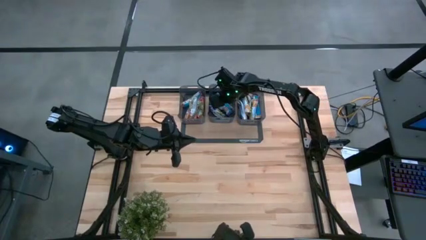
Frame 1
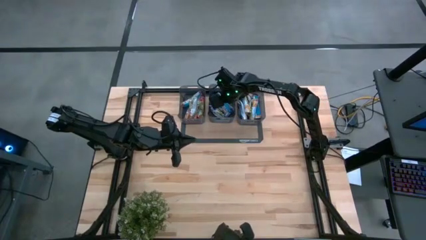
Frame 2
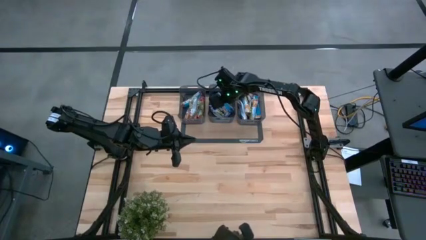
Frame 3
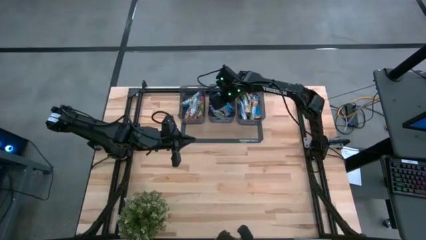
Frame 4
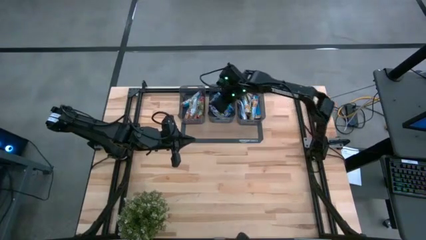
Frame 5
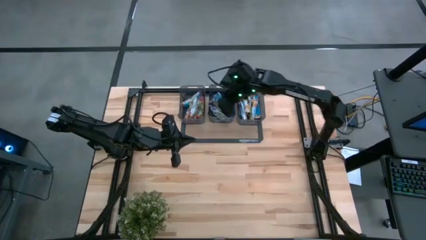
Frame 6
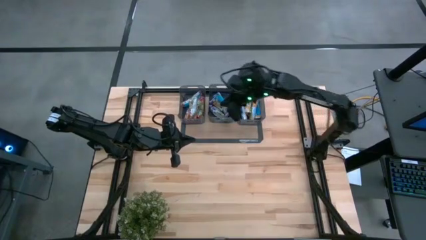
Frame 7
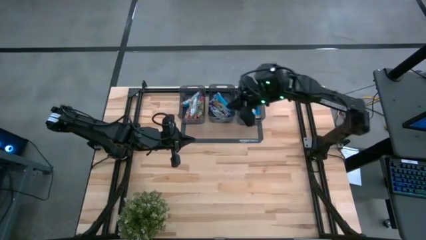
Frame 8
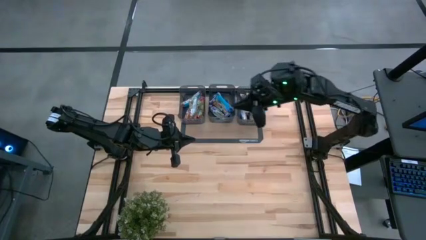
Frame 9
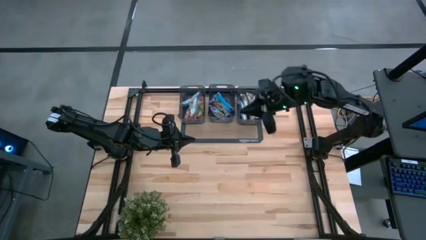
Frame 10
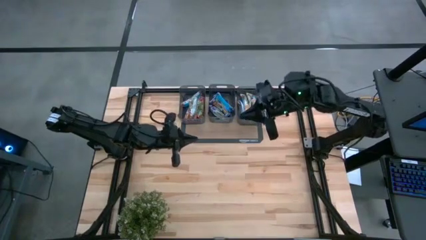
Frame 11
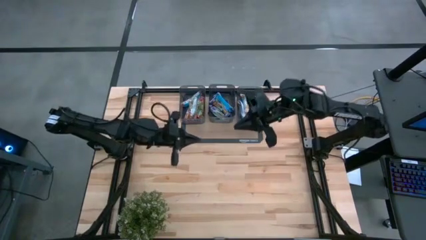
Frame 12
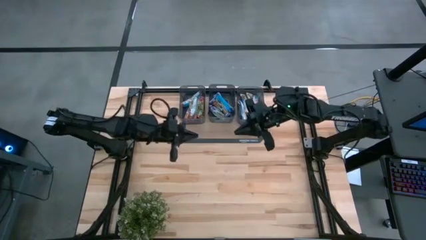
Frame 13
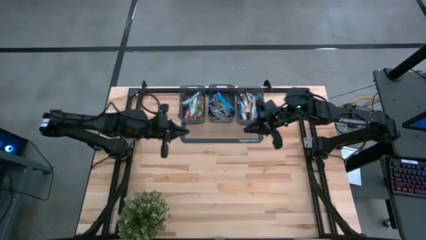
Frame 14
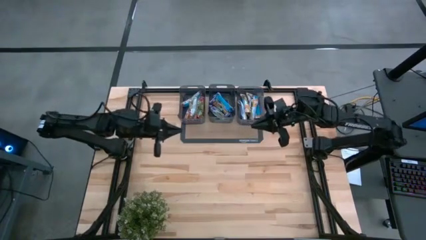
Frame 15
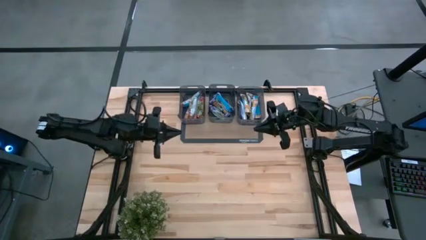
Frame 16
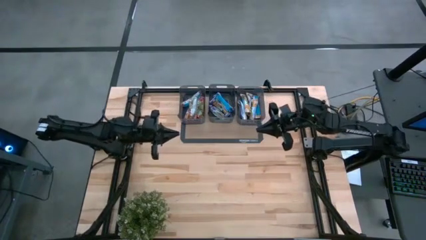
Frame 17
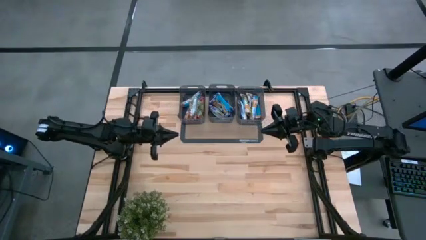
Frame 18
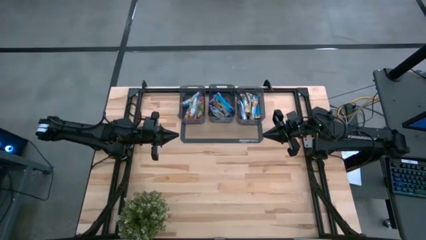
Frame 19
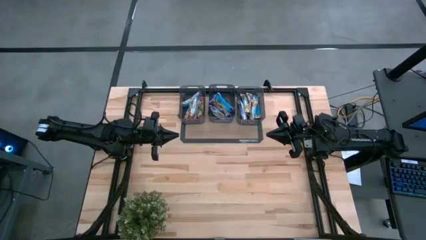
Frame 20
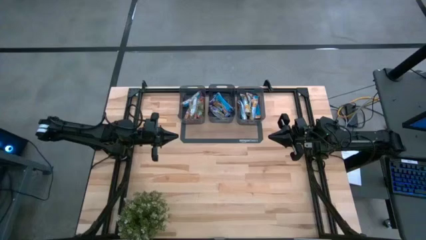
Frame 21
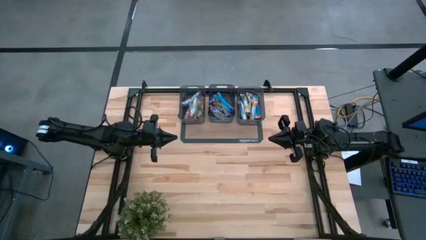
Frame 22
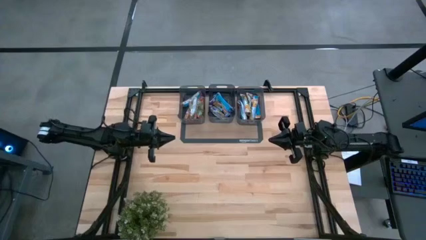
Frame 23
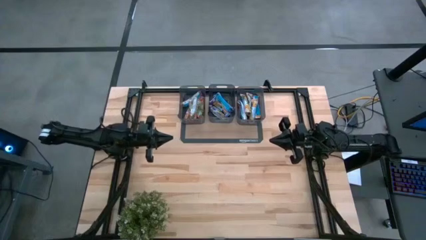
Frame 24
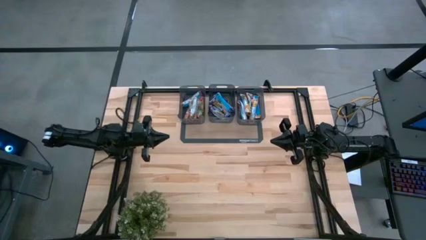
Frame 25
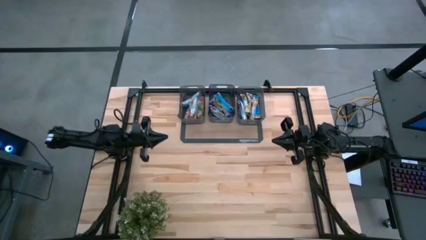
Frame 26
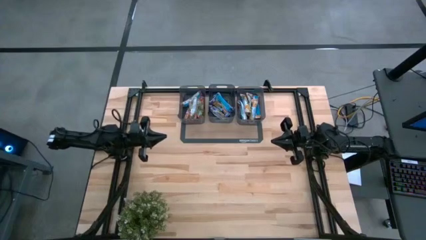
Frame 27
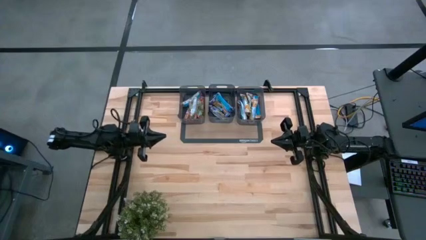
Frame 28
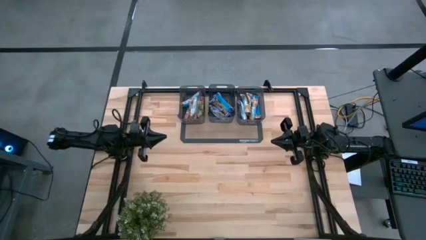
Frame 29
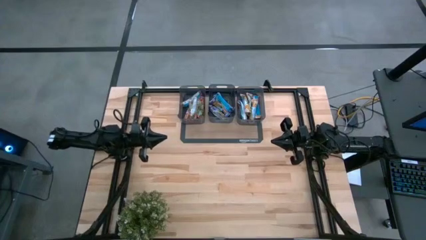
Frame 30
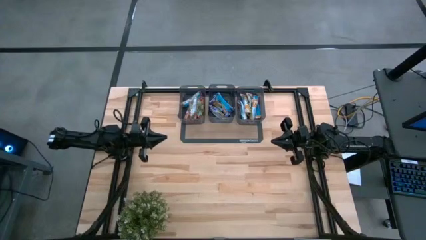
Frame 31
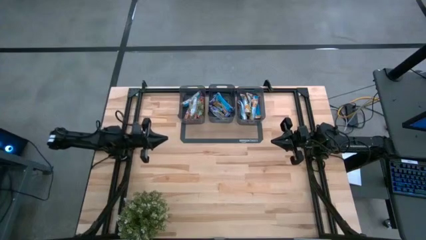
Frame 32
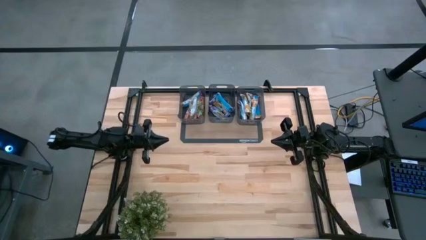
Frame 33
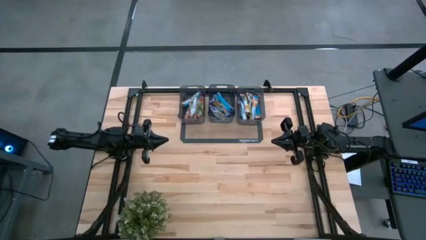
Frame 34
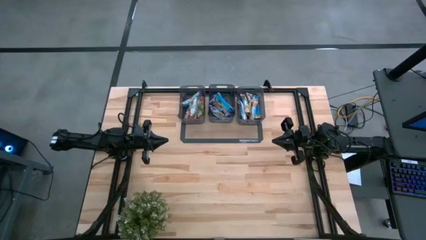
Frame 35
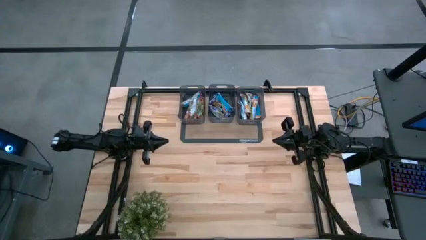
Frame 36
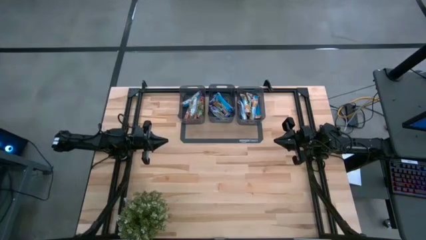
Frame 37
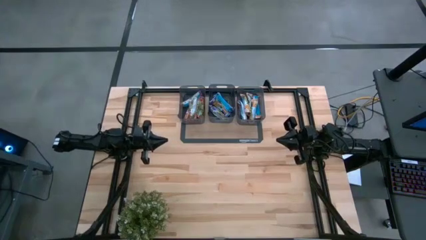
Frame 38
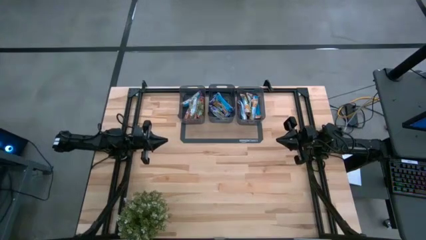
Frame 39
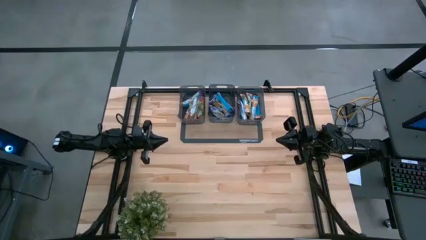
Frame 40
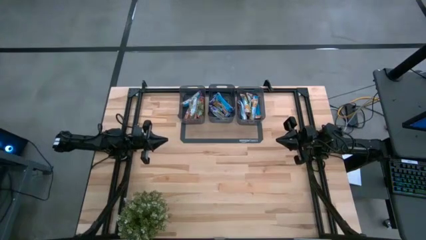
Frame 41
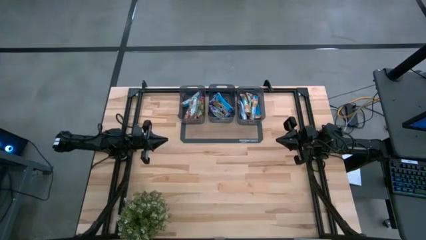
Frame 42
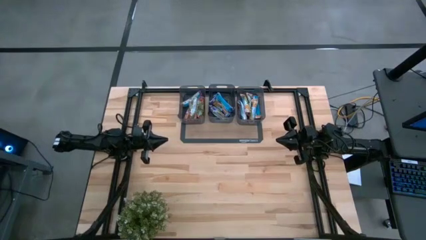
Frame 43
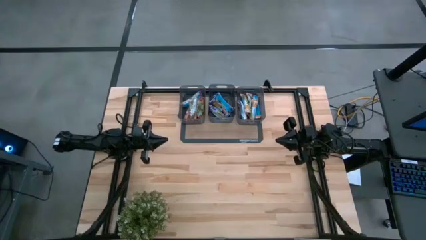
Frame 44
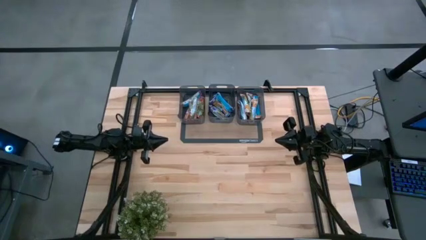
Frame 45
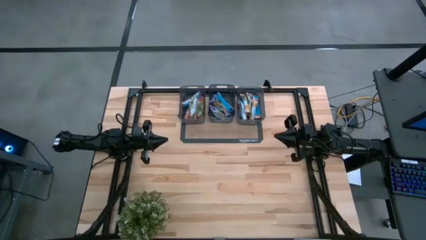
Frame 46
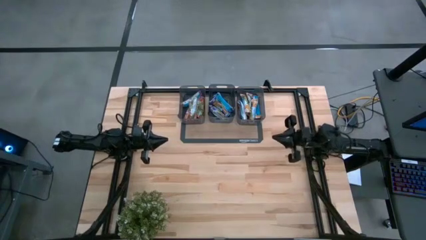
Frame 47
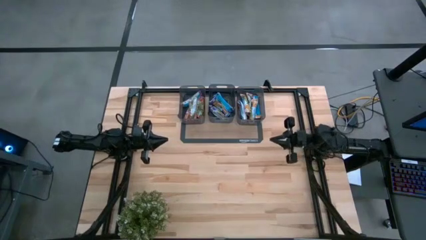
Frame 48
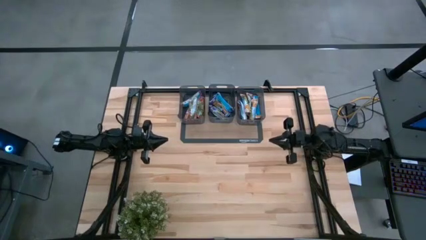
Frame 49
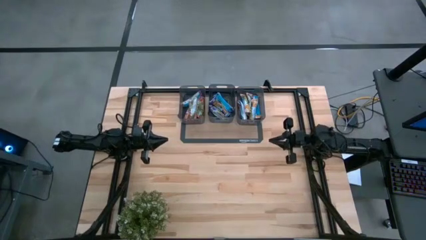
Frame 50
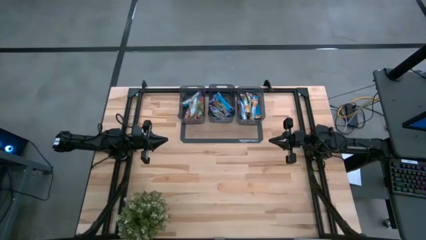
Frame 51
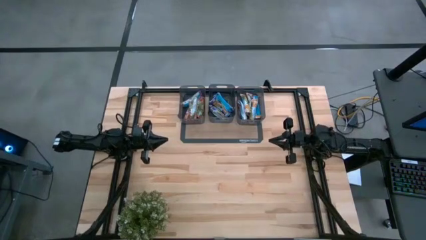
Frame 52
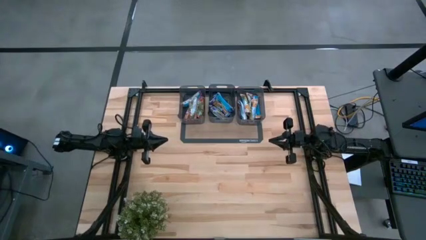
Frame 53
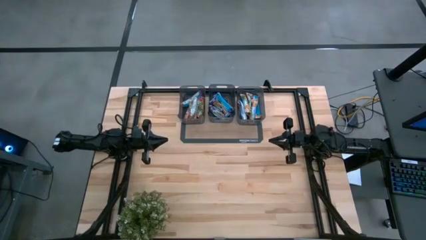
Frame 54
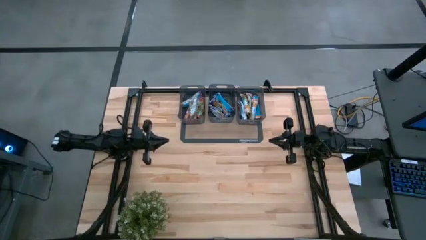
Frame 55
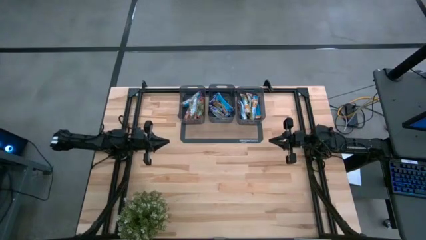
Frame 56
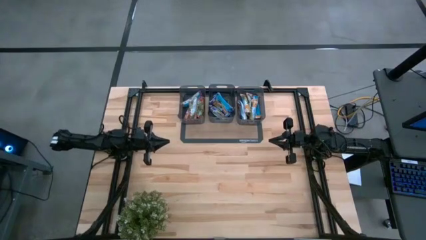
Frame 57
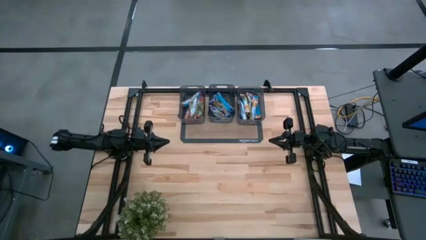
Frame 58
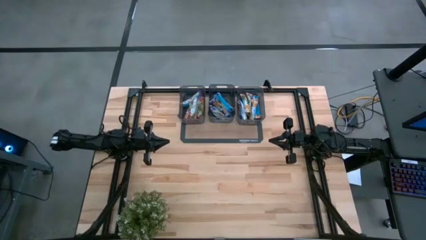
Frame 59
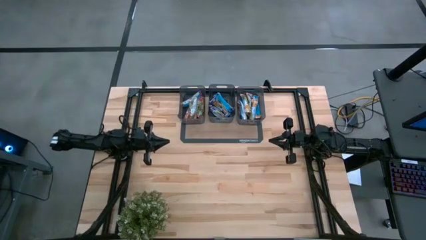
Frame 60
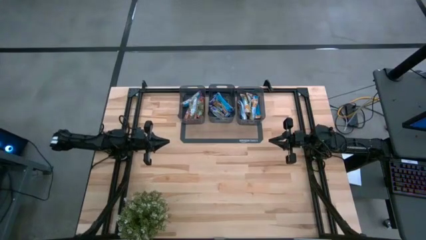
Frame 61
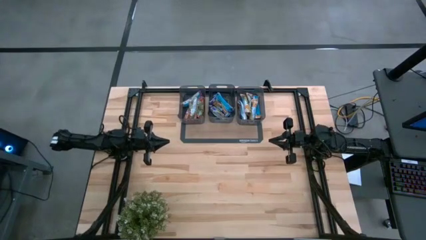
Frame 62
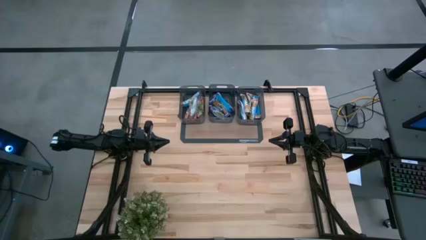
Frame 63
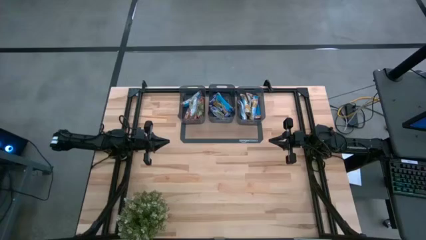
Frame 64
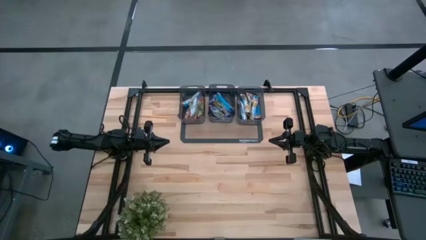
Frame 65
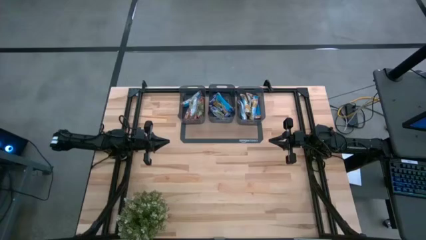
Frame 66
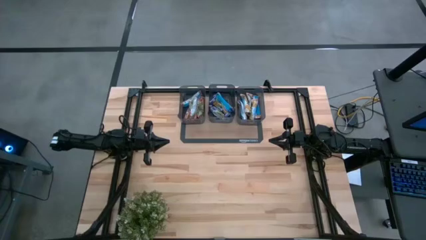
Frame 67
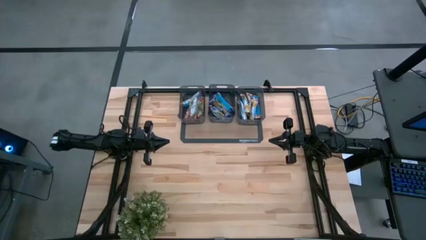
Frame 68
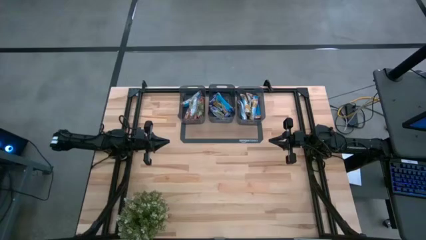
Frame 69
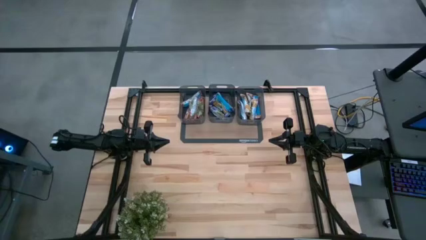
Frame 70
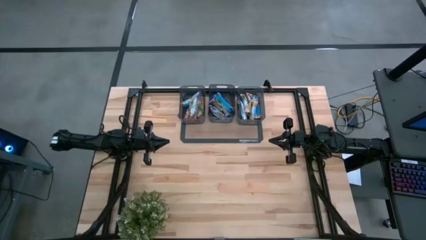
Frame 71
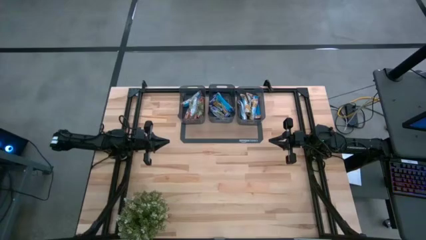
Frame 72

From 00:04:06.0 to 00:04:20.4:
Task: Pick and place Granola Bars by type
Return to Home Position
